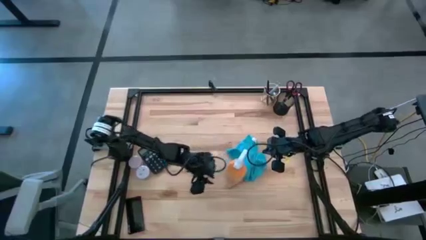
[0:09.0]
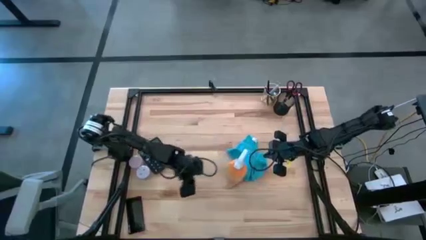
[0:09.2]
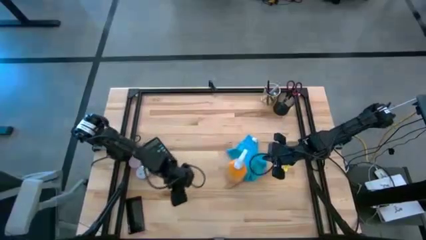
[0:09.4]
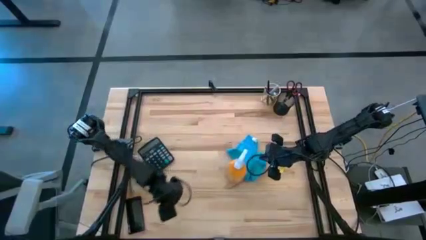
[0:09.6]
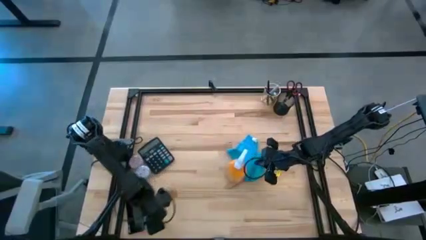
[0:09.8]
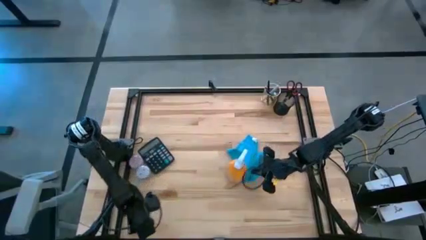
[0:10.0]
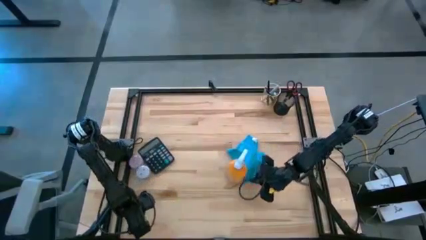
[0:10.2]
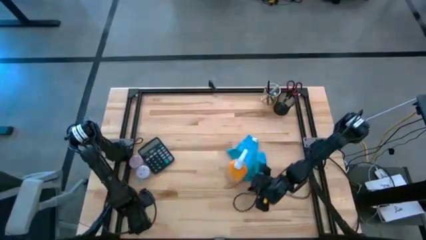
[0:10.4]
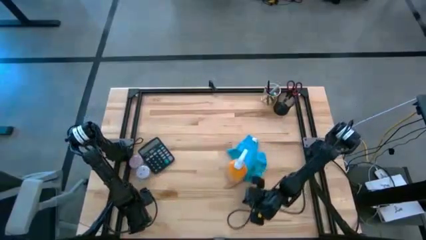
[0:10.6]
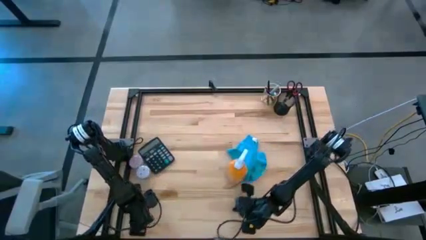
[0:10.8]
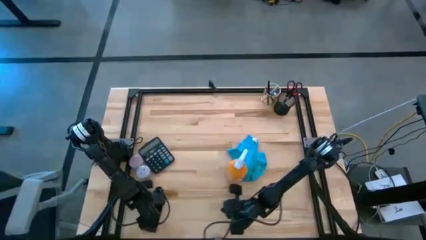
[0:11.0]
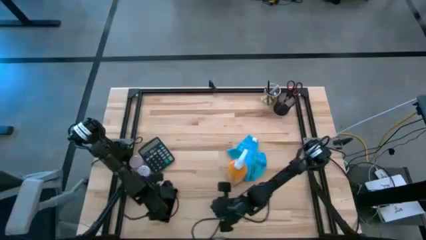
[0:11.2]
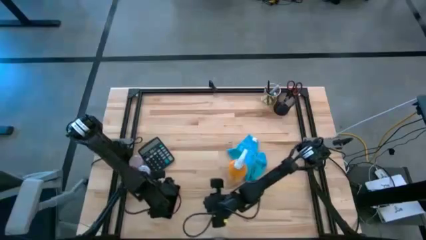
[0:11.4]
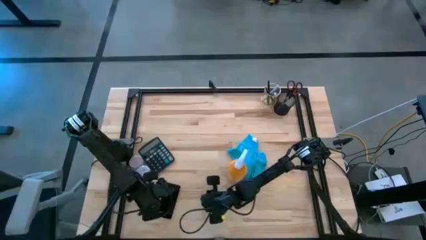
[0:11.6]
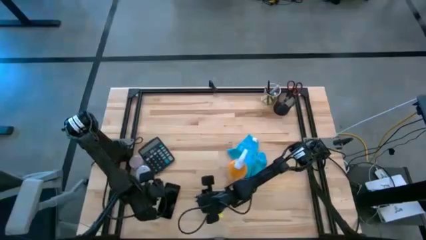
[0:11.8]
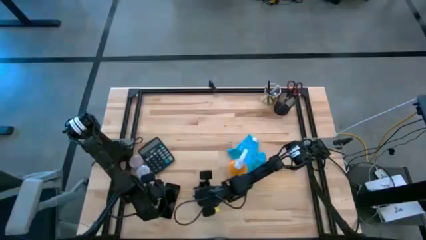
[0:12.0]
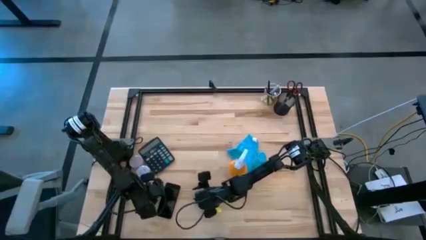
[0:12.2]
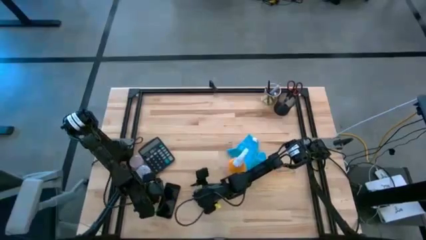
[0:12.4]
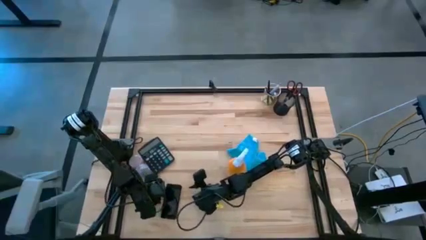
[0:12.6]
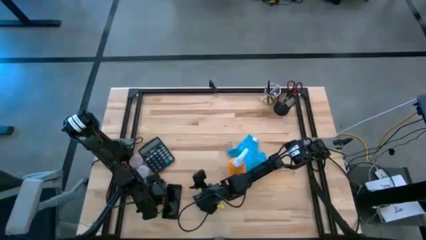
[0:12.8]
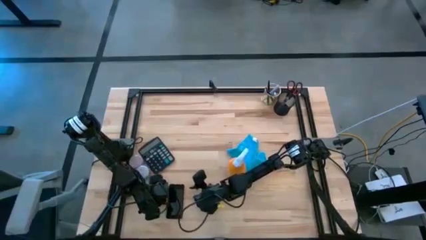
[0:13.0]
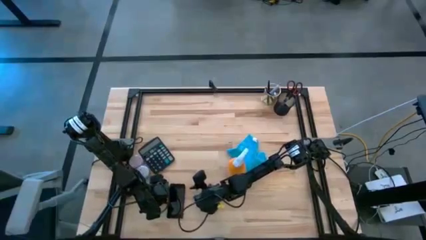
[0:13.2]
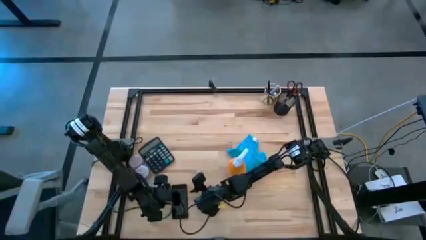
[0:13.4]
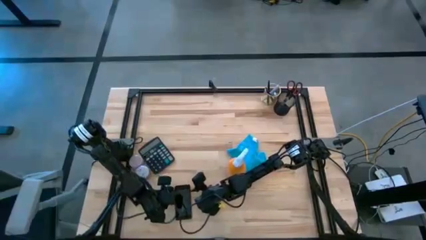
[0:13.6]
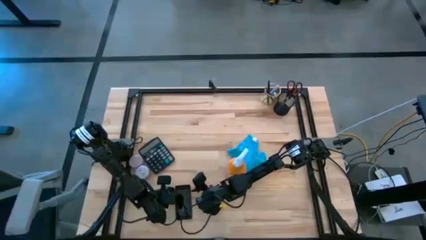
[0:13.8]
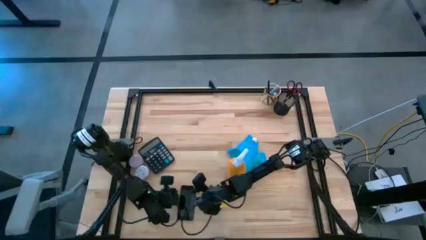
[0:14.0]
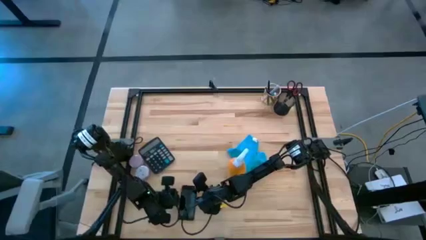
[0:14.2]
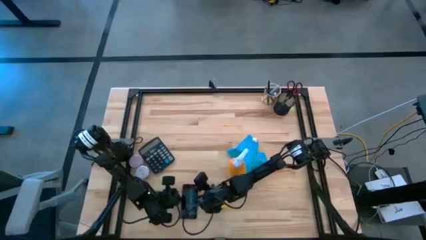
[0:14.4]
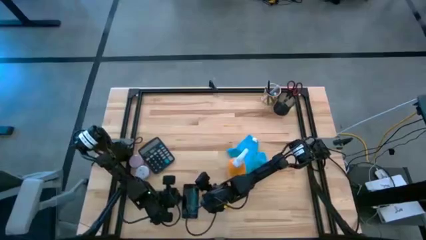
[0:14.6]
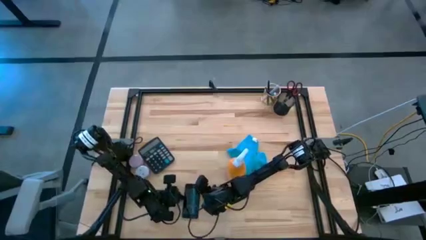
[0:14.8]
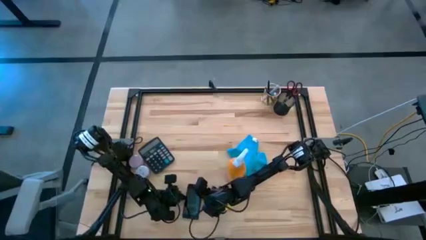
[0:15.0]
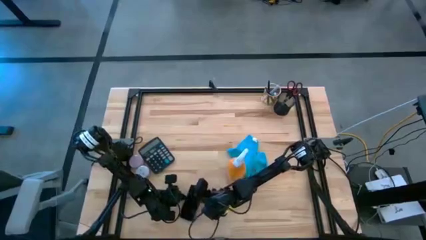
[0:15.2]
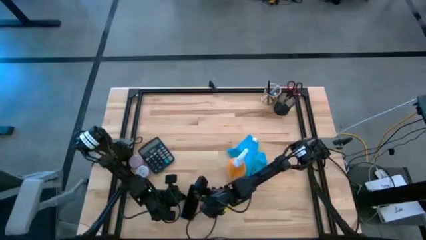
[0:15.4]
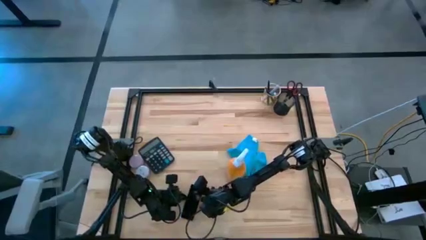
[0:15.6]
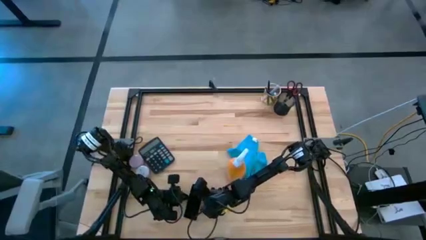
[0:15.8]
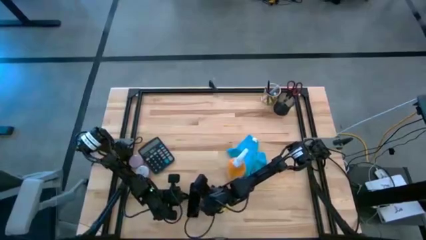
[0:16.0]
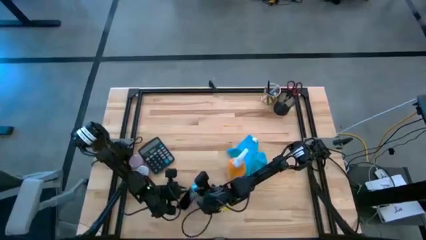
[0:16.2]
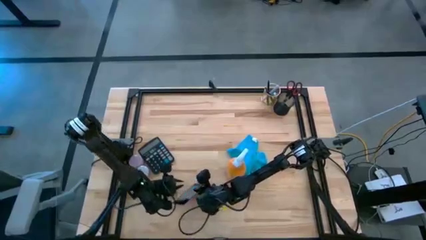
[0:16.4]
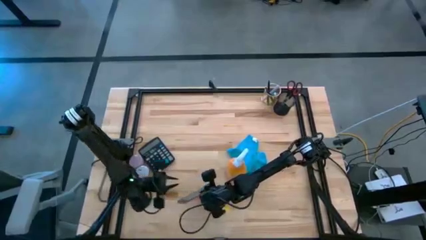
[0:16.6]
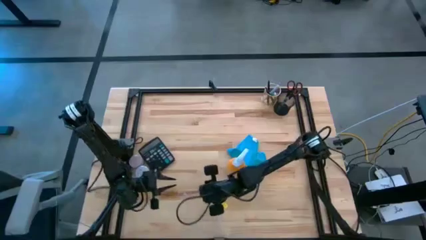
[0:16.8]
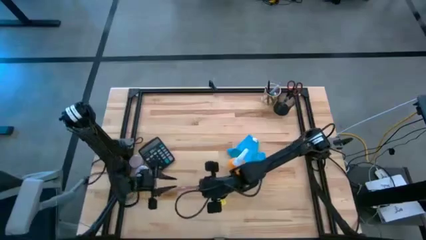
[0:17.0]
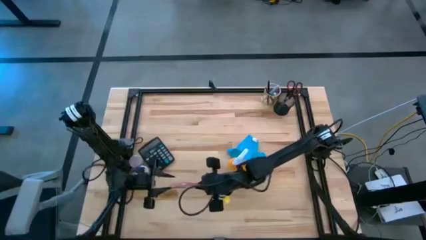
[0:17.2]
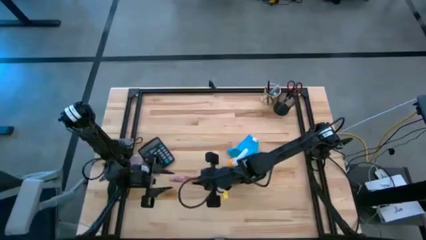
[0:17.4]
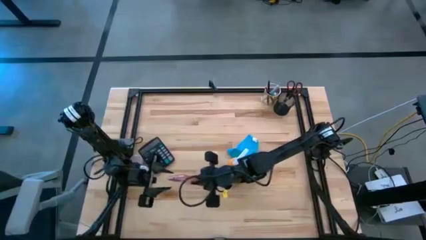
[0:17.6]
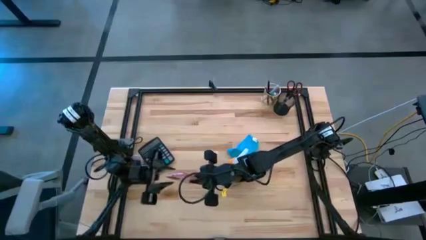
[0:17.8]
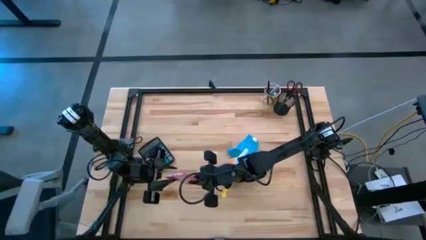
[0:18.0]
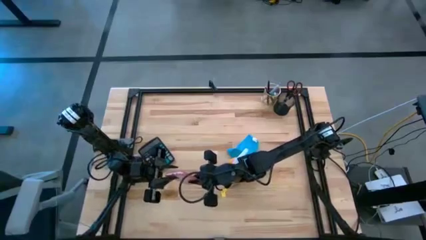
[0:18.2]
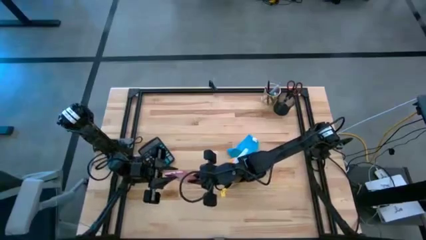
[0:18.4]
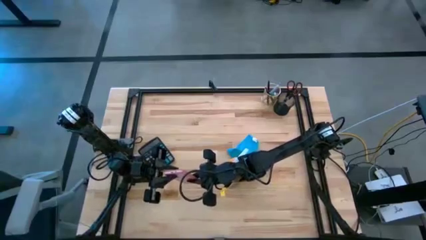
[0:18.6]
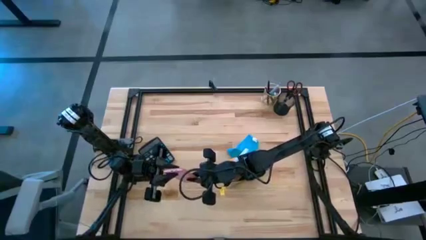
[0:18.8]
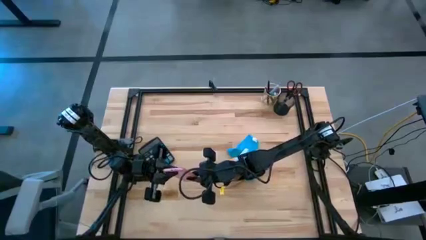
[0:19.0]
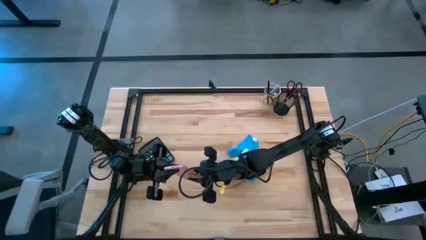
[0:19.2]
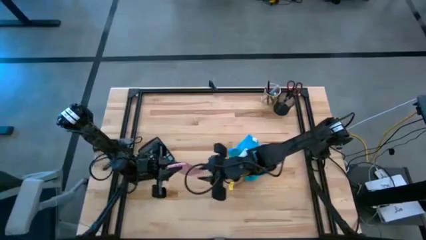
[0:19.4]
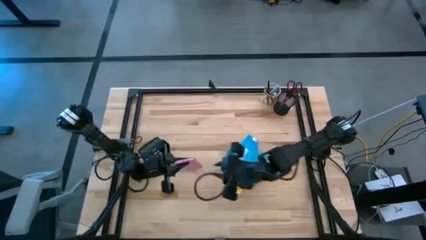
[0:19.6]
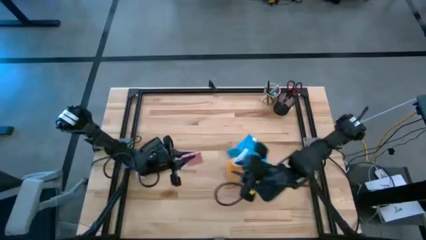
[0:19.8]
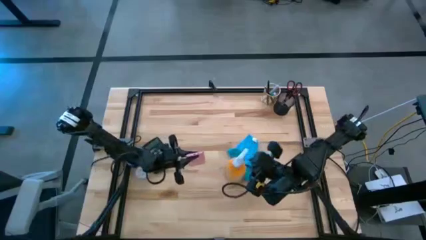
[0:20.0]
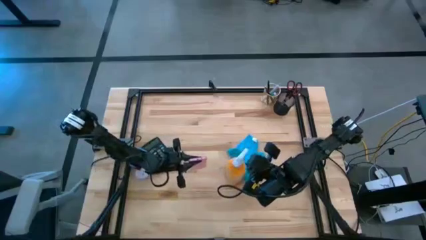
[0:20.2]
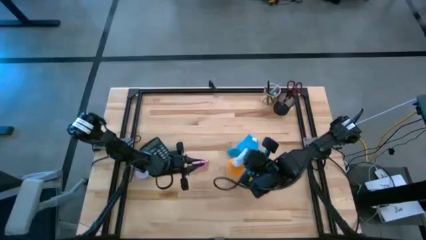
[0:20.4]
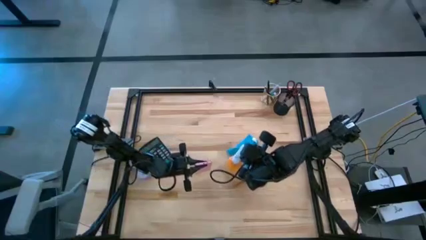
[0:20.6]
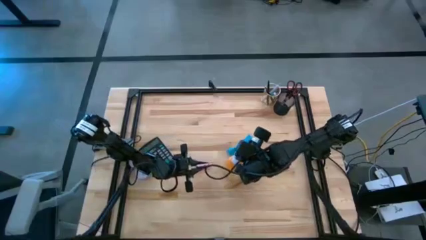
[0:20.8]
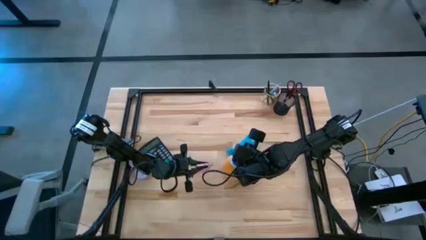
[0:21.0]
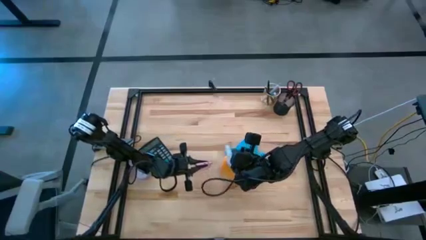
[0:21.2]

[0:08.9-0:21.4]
Task: Apply microfiber cloth
Spray the pink cellphone using the yellow spray bottle

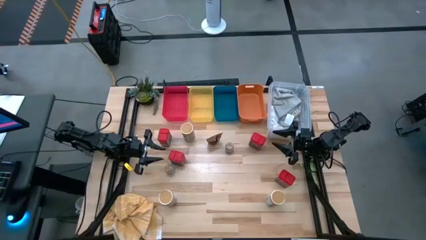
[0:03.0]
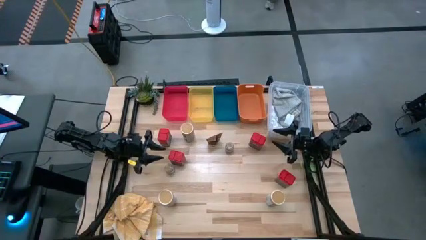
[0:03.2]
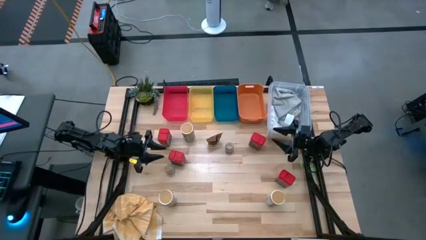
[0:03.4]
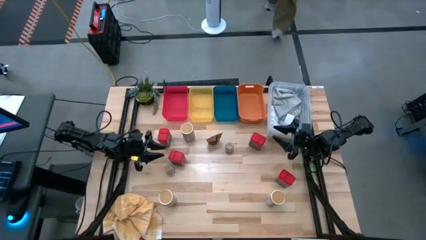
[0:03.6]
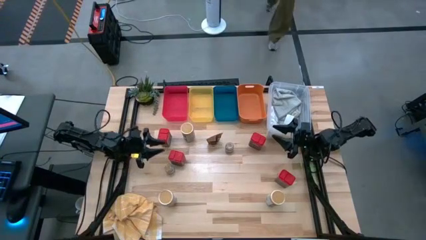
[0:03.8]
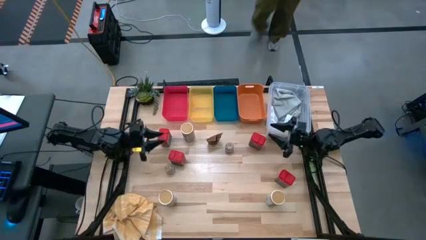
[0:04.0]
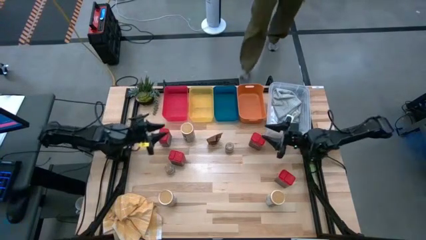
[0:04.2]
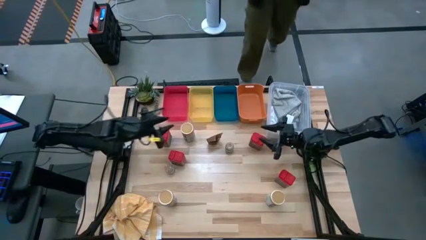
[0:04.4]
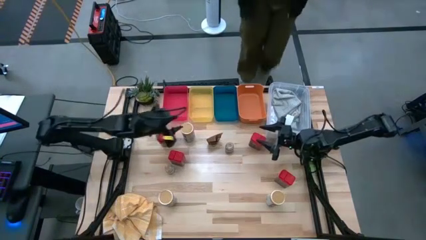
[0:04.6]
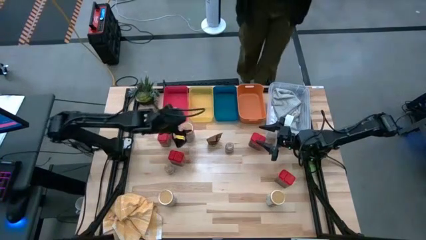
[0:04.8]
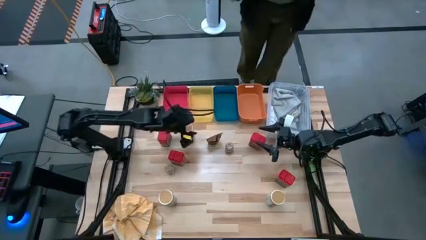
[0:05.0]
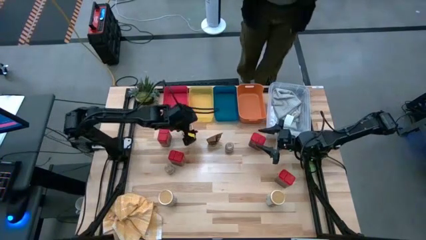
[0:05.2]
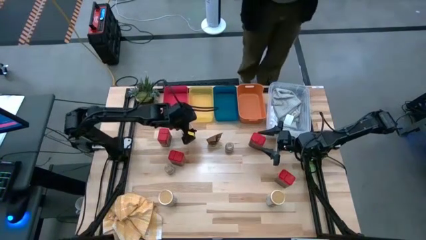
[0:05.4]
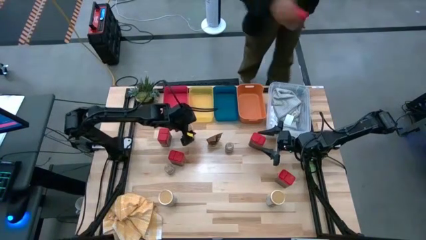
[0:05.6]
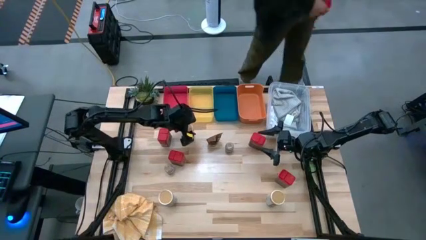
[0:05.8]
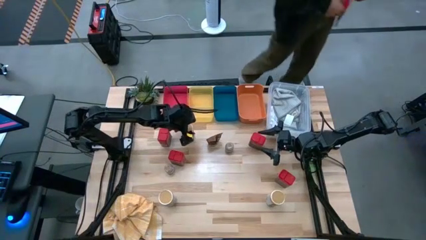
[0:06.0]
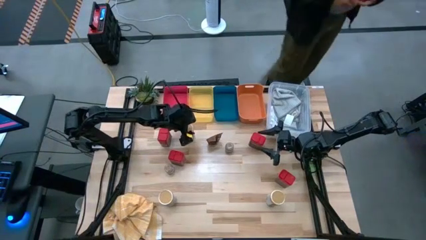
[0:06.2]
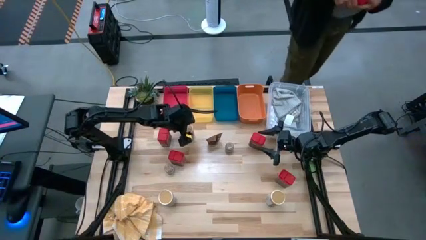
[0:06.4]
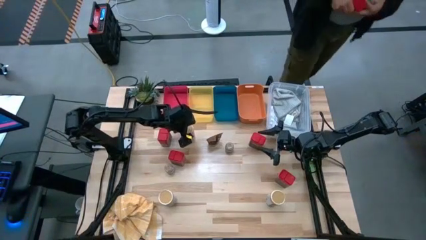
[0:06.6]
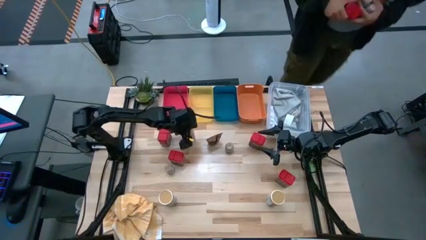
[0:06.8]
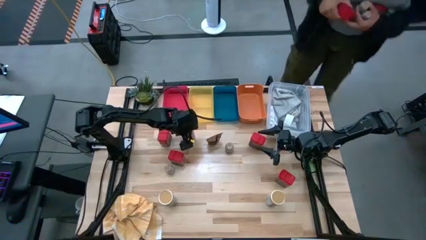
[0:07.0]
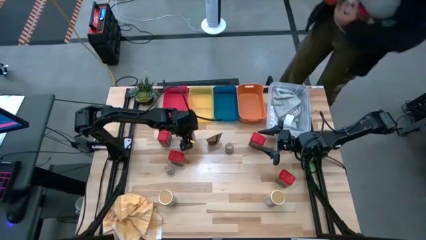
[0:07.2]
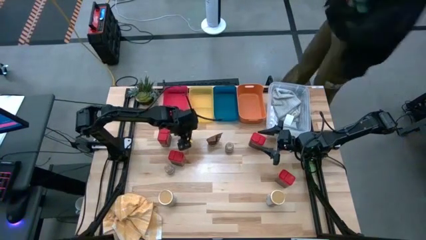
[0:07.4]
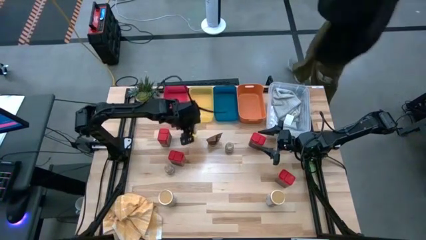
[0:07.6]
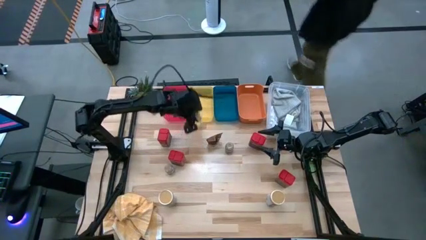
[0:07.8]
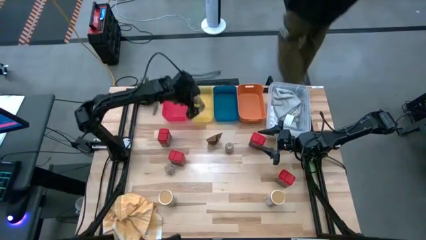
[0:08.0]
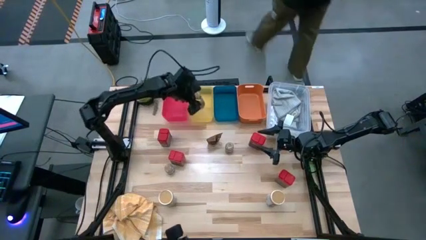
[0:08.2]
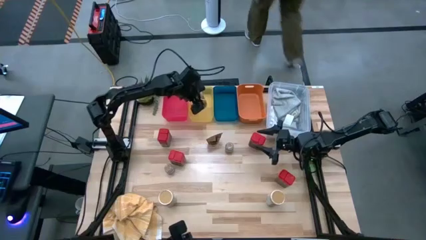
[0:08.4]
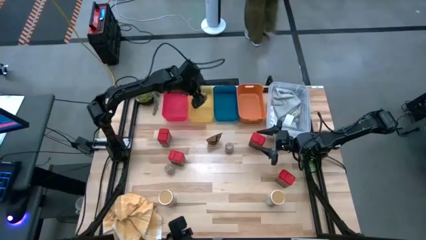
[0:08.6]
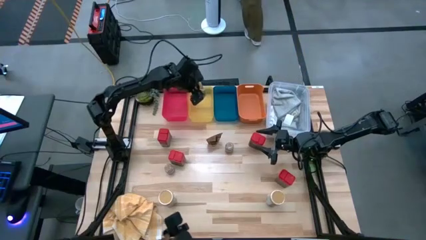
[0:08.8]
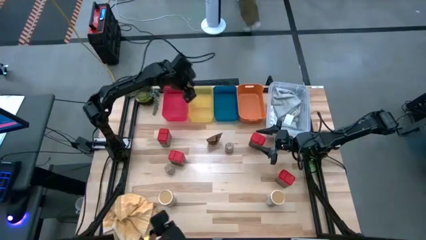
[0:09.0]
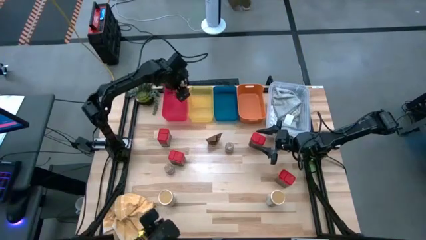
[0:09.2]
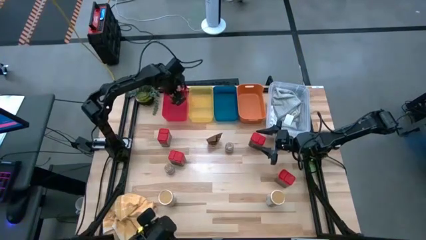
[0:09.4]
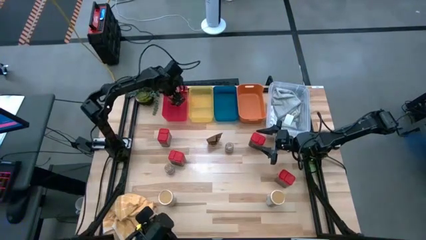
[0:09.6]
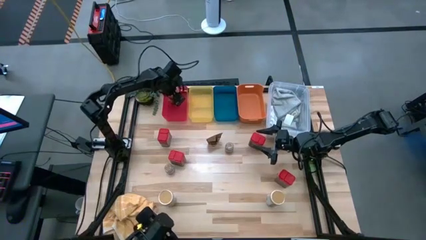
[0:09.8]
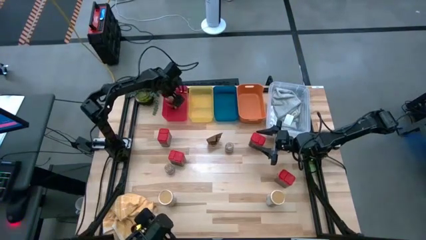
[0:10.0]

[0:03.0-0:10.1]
Task: Sort spices by type
Put the gold spice bottle into the red bin
